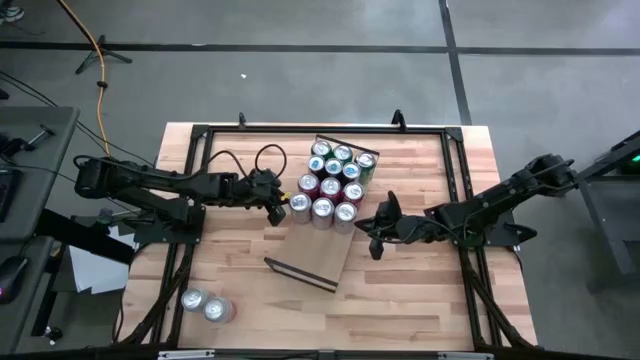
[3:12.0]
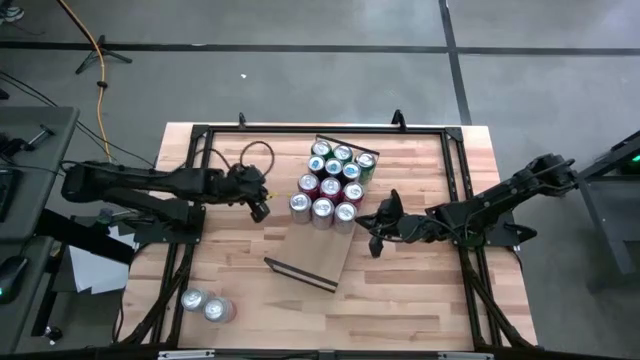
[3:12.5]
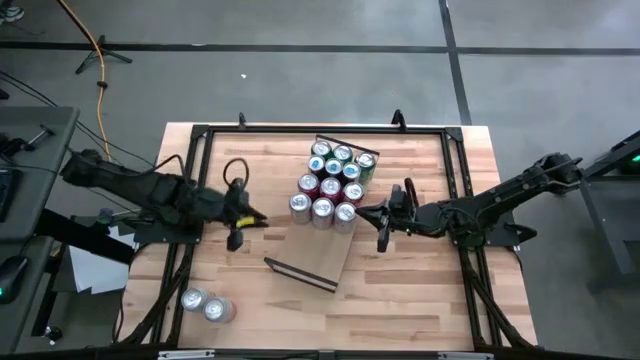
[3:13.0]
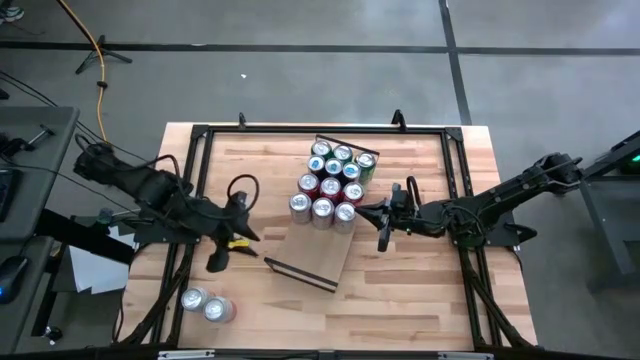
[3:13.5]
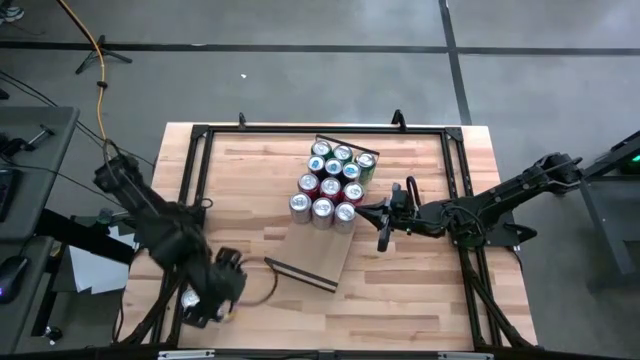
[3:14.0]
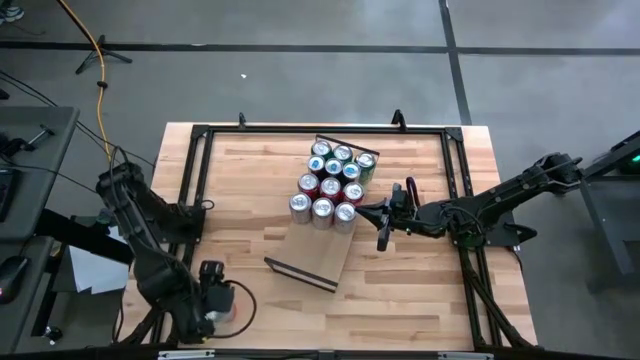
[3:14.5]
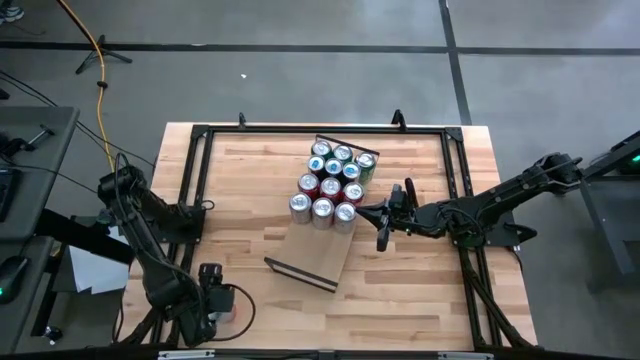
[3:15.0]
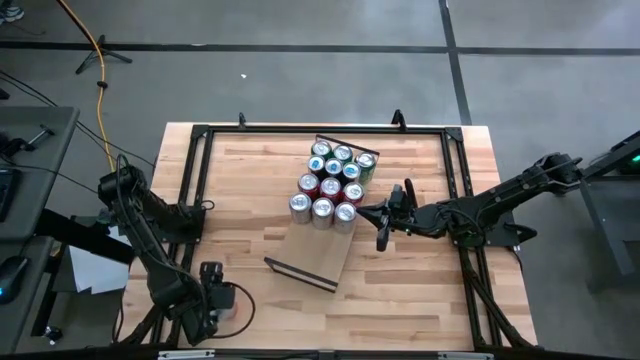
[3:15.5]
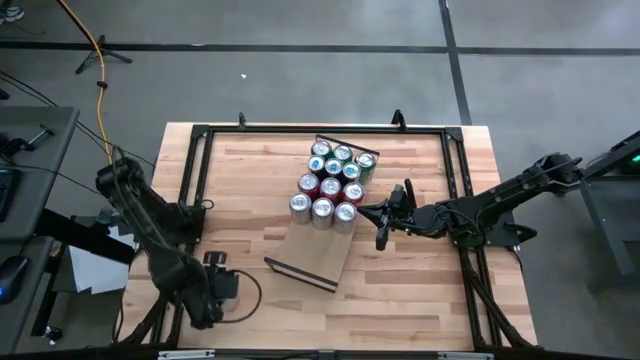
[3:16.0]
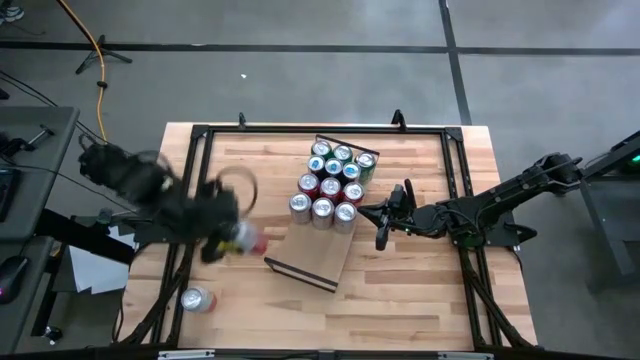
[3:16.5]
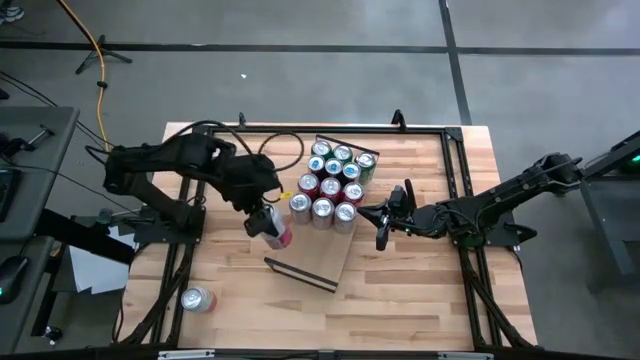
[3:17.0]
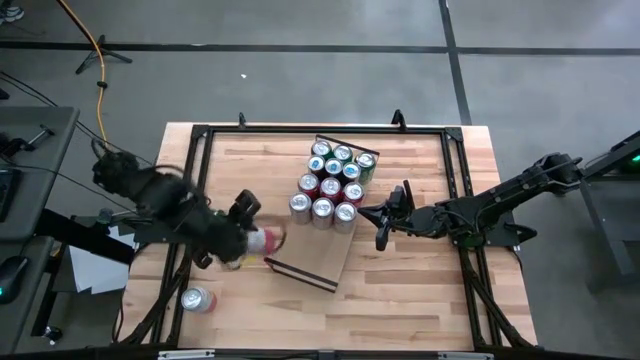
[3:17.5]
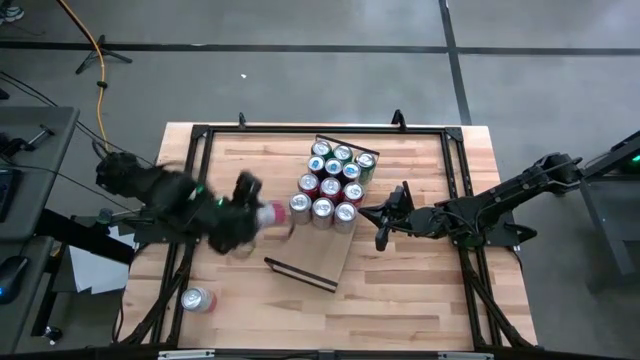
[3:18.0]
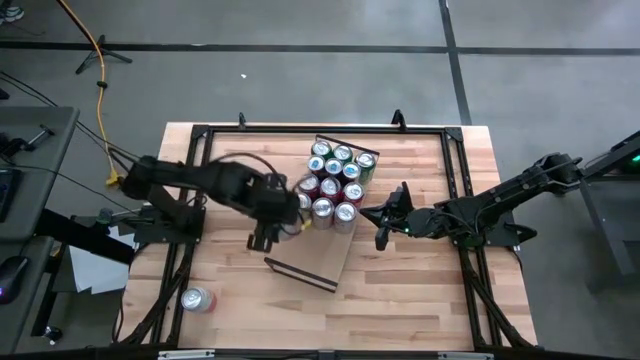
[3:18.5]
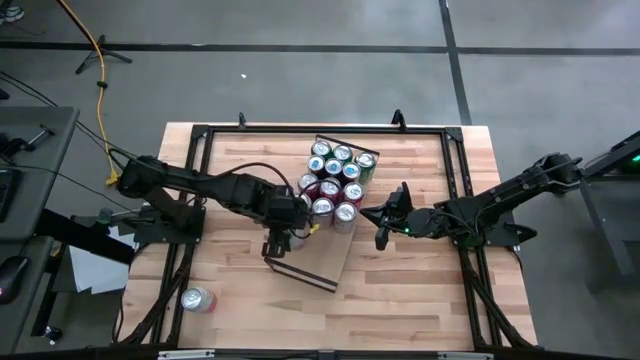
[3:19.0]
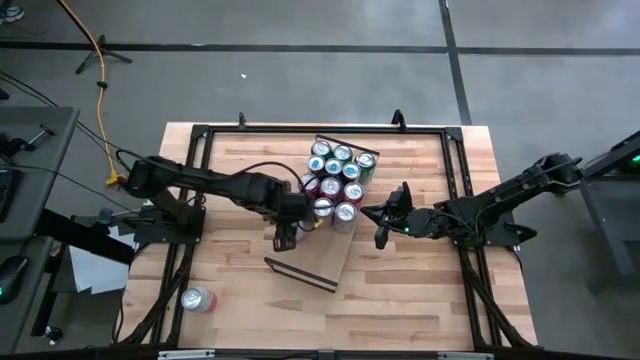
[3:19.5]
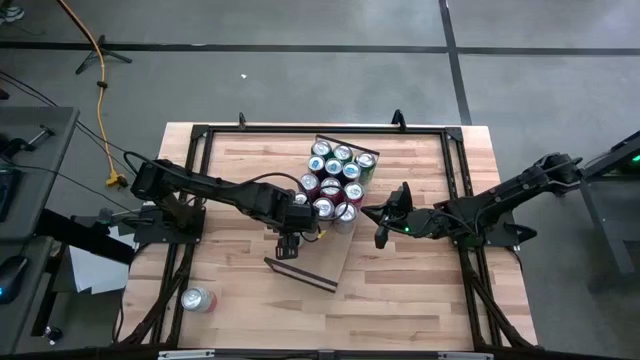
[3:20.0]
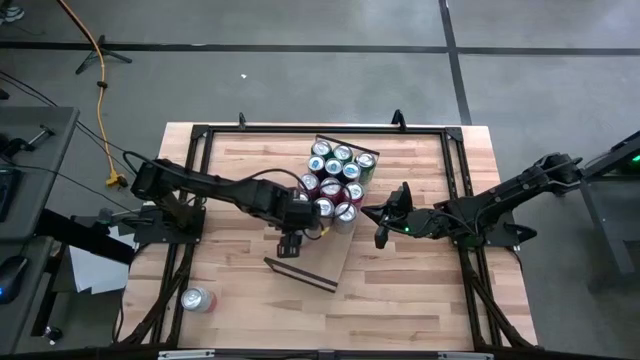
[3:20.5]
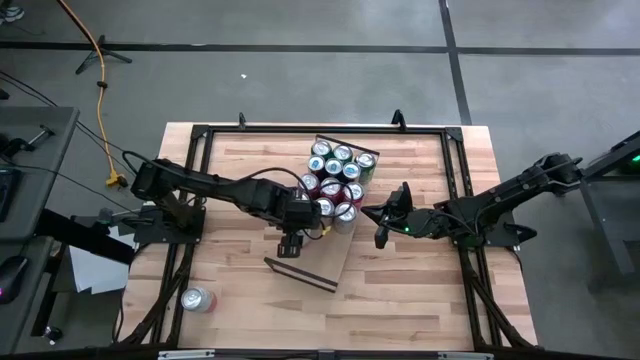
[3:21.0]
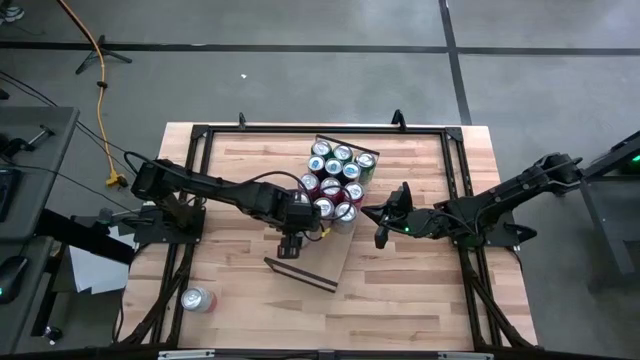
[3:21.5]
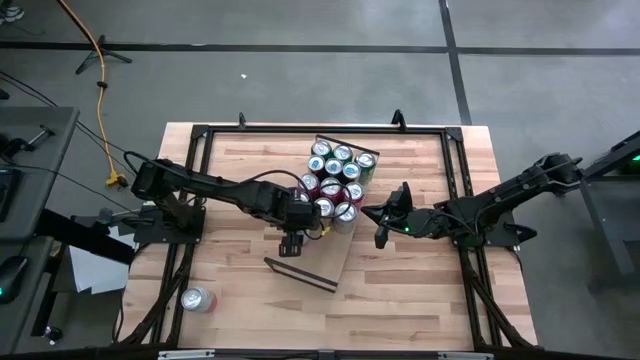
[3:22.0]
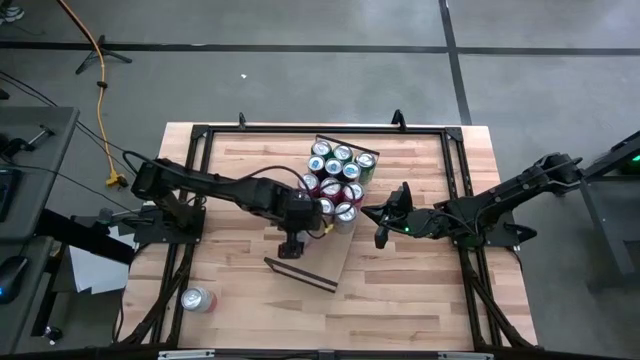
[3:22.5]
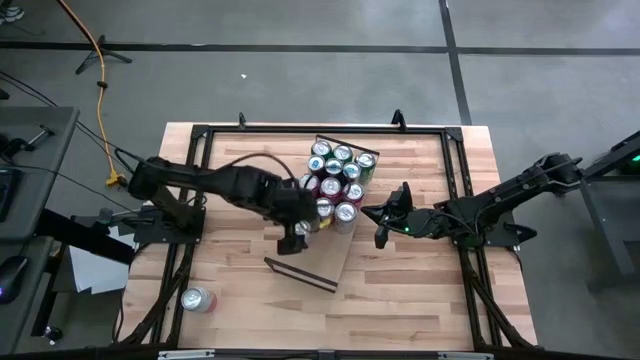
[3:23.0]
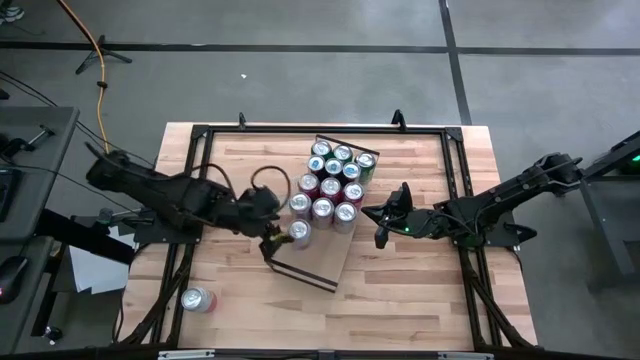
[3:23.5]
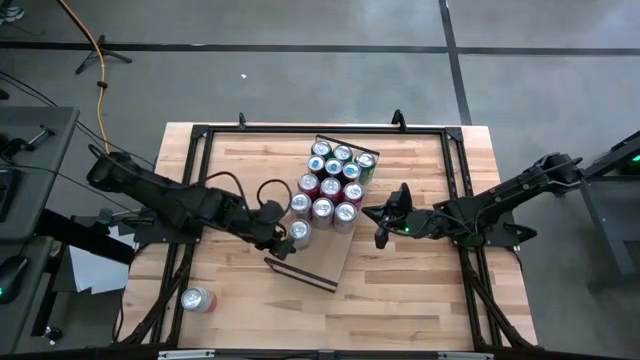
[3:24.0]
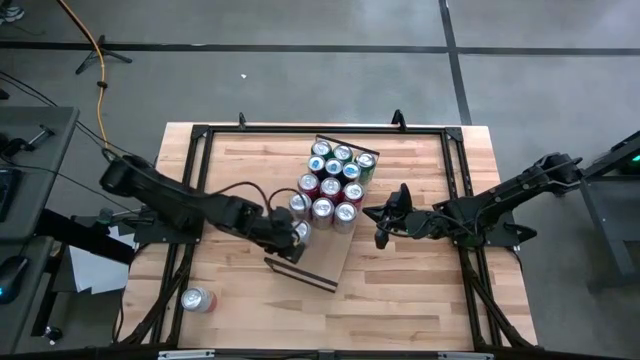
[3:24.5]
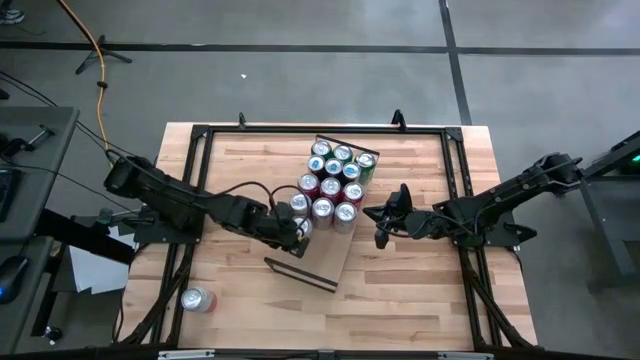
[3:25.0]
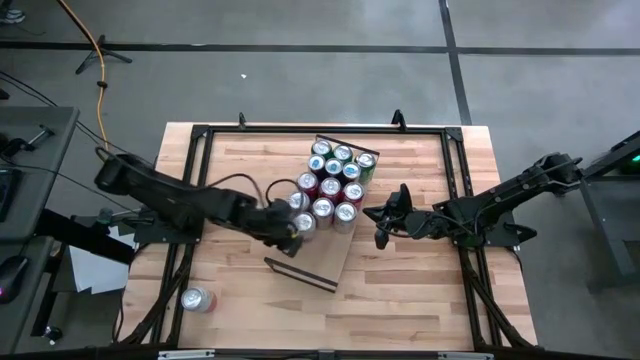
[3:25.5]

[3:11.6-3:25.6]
Task: Place canned beverage on shelf
Put the right white and pink soda can on the shelf

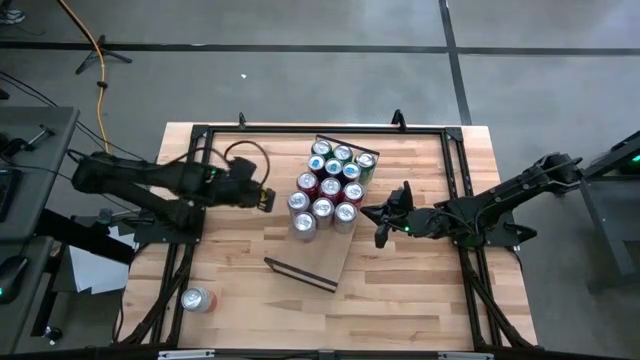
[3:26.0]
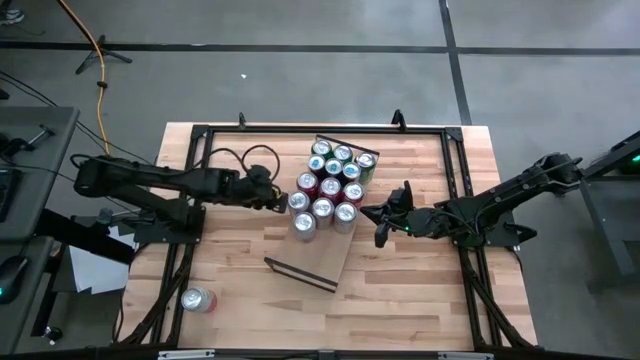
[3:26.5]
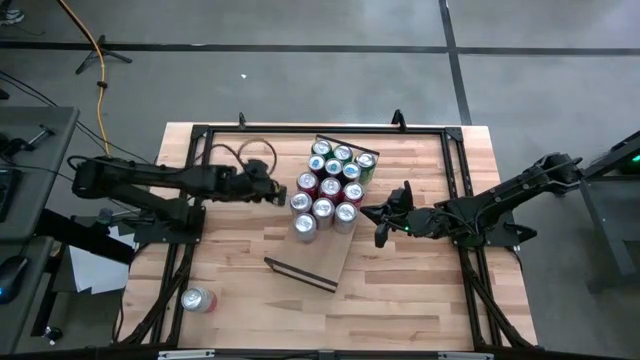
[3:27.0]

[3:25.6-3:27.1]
Adjust the red and silver soda cans on the shelf

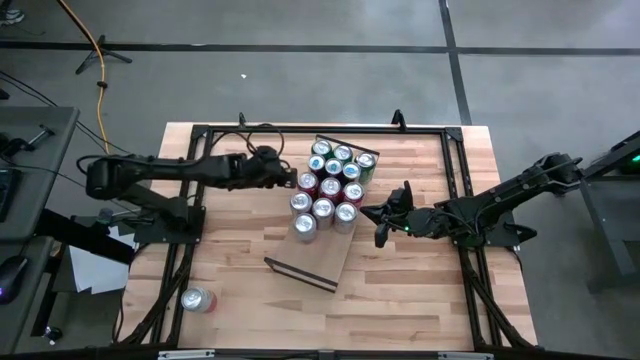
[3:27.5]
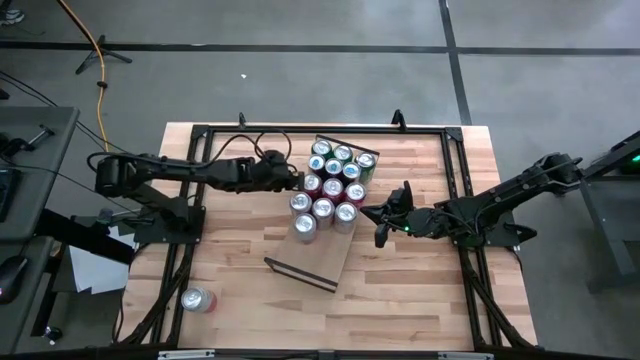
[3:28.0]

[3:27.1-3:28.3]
Adjust the red soda cans on the shelf
